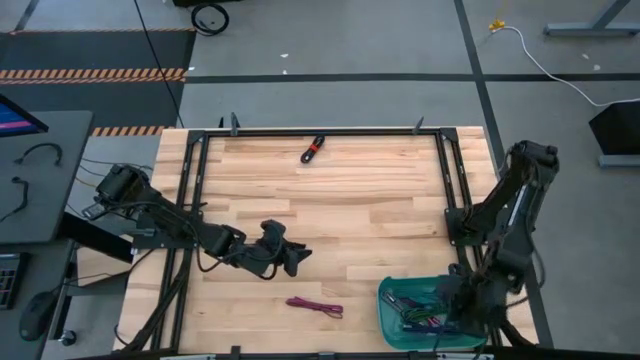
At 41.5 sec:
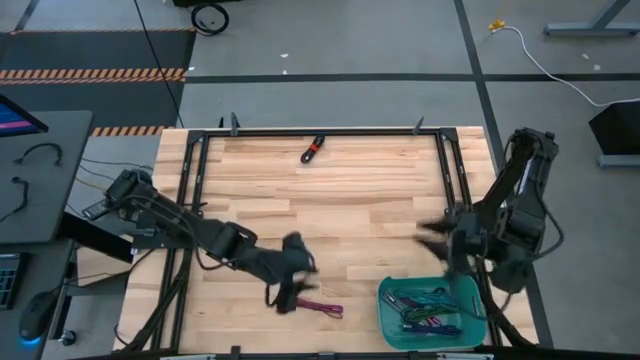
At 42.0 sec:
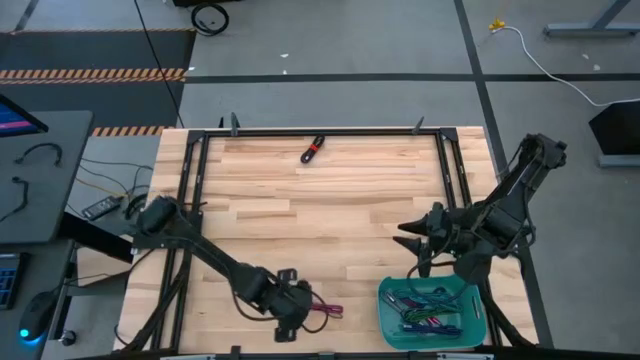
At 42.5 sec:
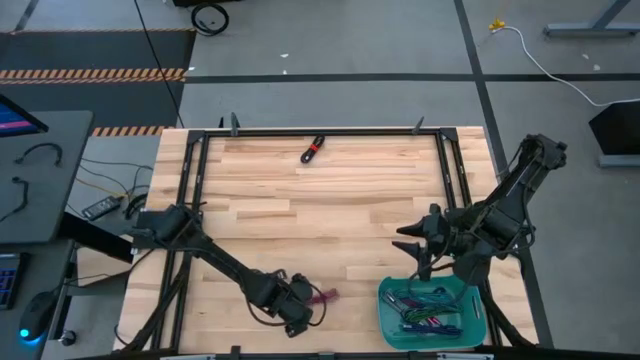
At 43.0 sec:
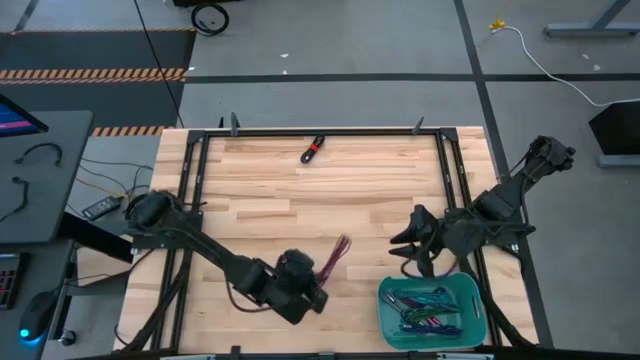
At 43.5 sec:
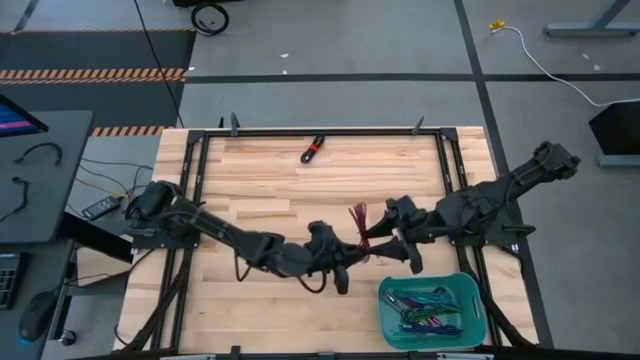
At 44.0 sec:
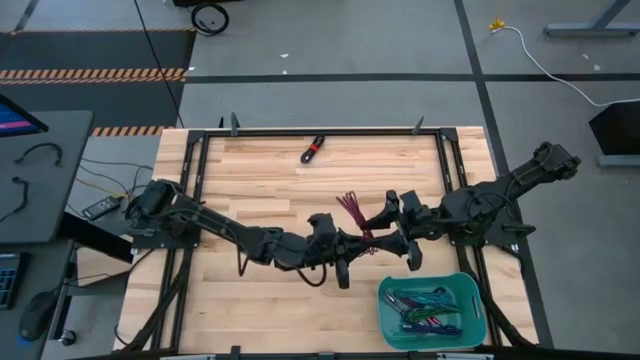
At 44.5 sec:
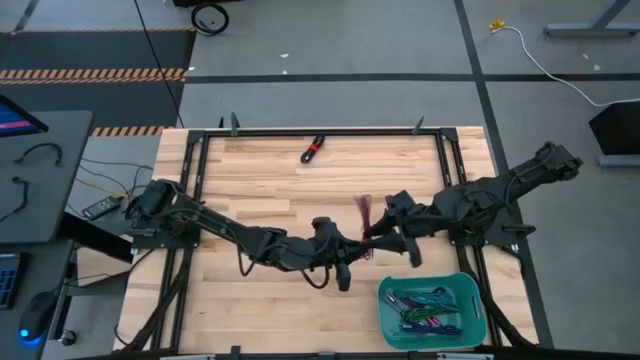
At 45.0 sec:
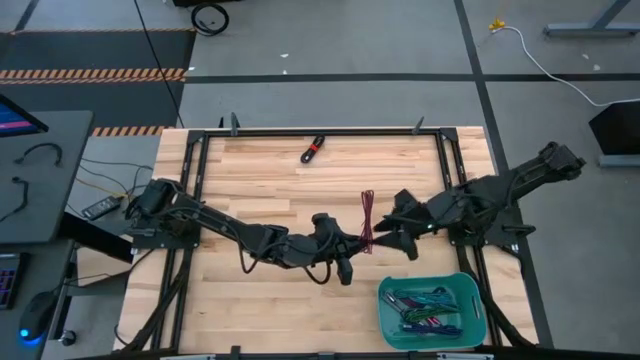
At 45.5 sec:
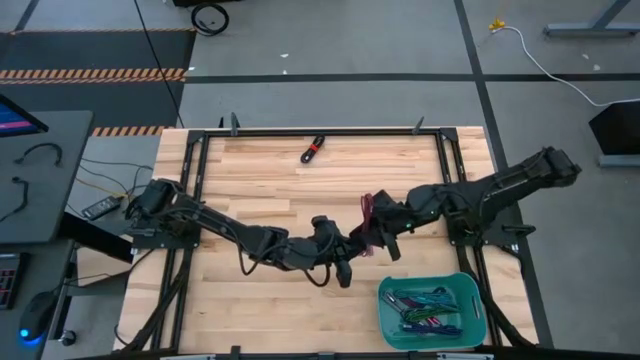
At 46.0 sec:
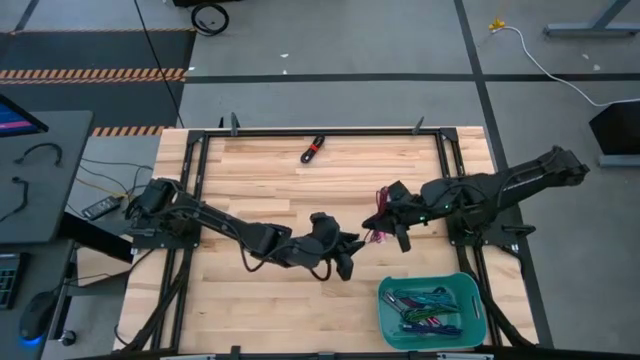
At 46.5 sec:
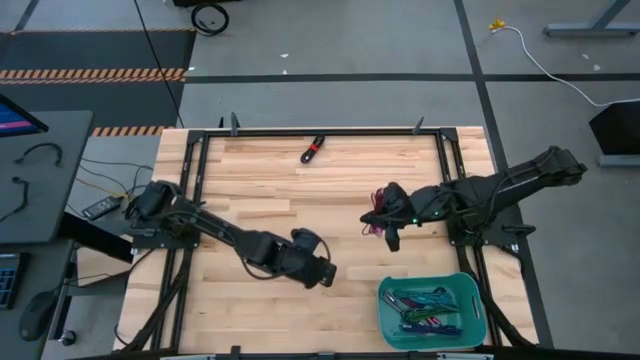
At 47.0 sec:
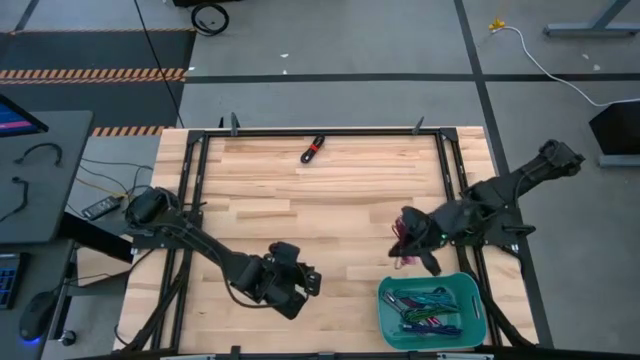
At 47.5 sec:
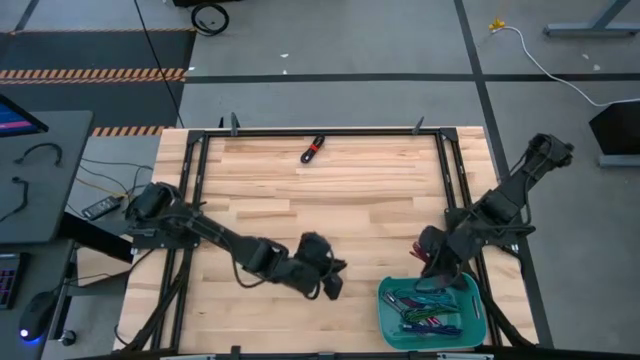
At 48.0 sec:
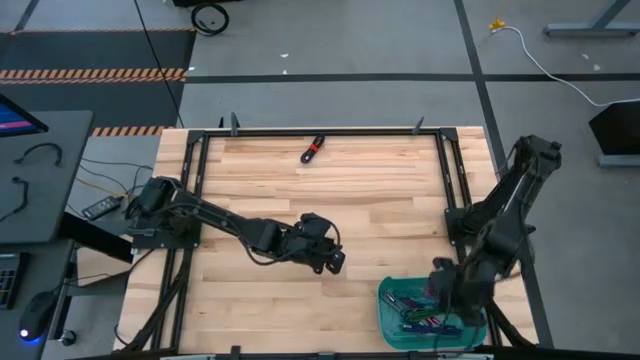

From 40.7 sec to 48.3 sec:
Task: Pick and place USB-C Cables
Put the pink charger cable into the green bin

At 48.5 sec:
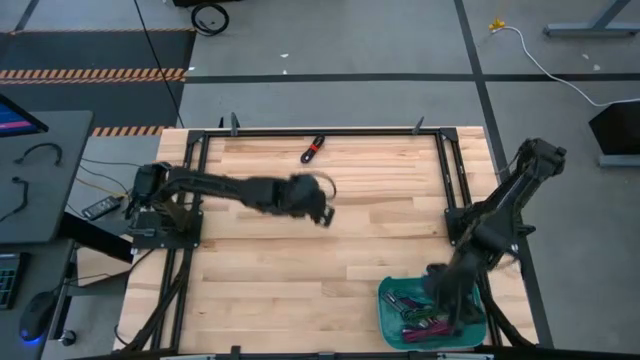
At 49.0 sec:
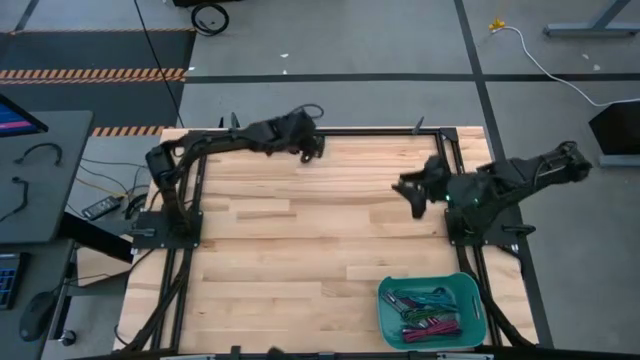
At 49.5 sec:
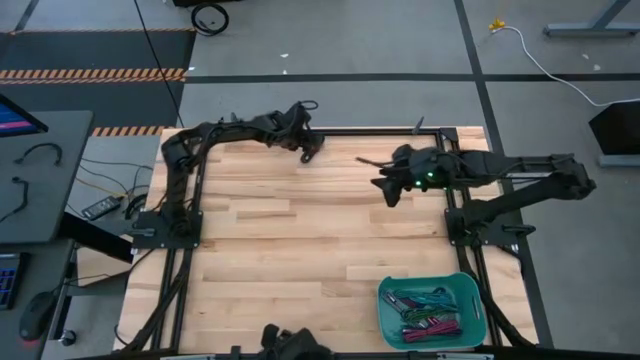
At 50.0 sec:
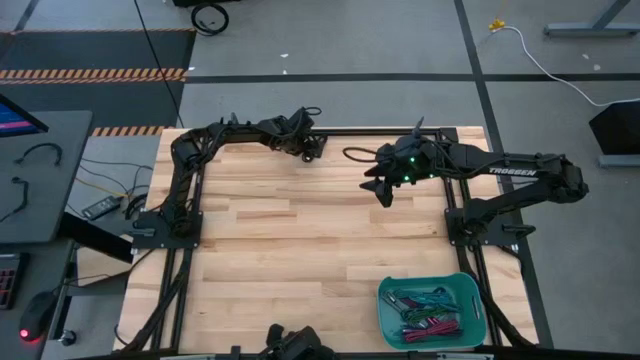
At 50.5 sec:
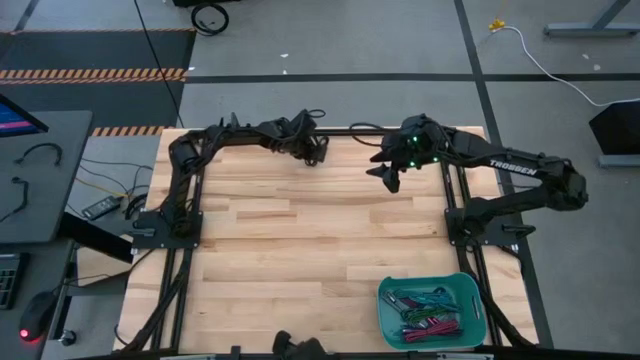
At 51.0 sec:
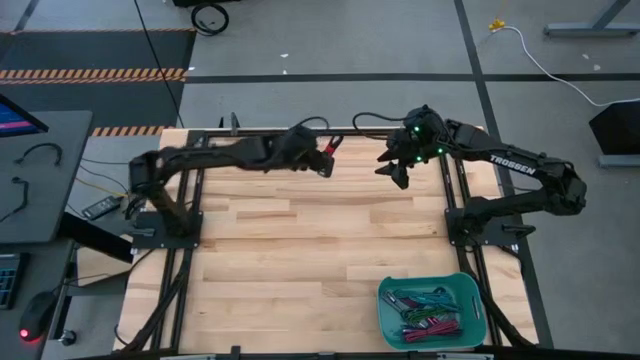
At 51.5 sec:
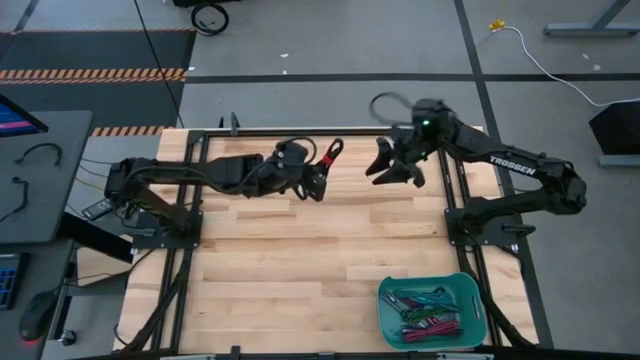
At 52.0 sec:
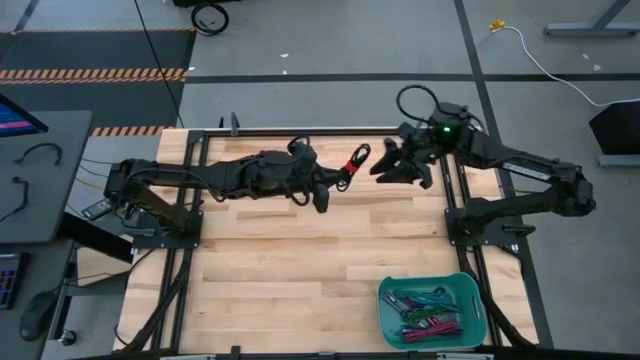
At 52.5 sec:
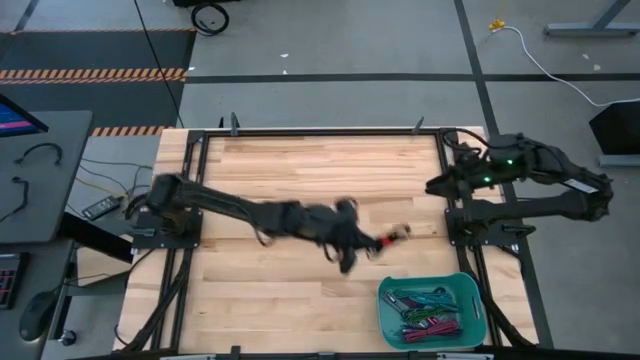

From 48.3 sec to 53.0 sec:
Put the black charger cable into the green bin

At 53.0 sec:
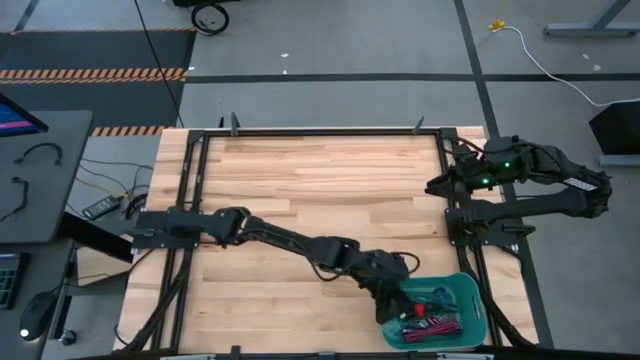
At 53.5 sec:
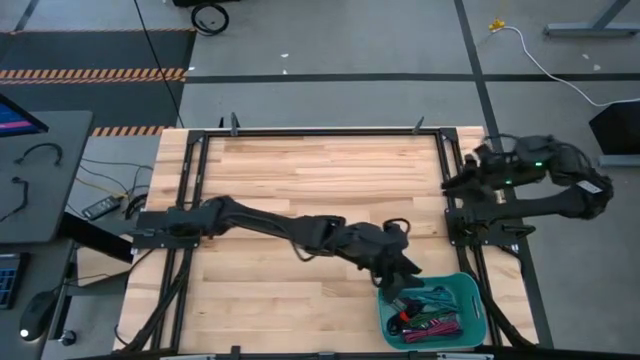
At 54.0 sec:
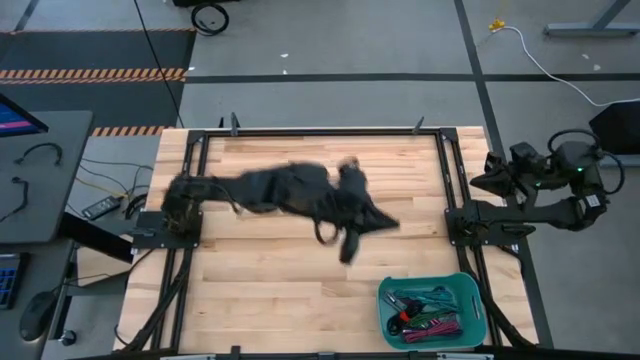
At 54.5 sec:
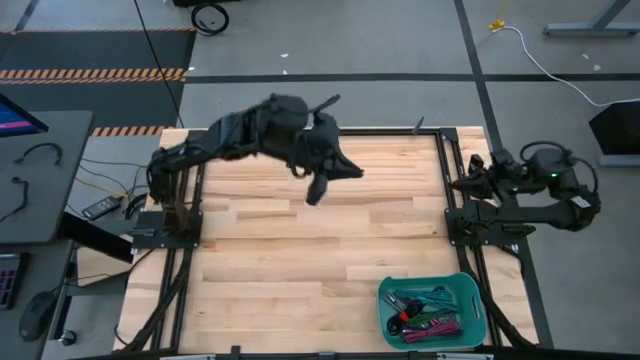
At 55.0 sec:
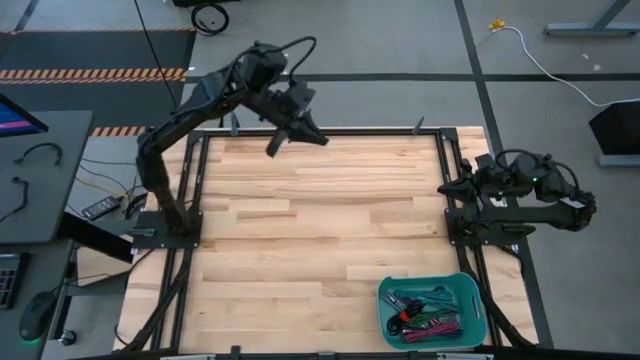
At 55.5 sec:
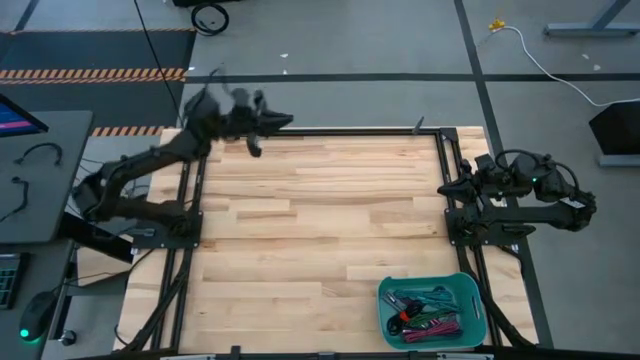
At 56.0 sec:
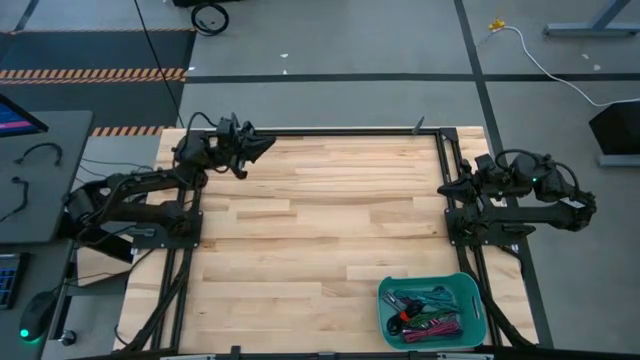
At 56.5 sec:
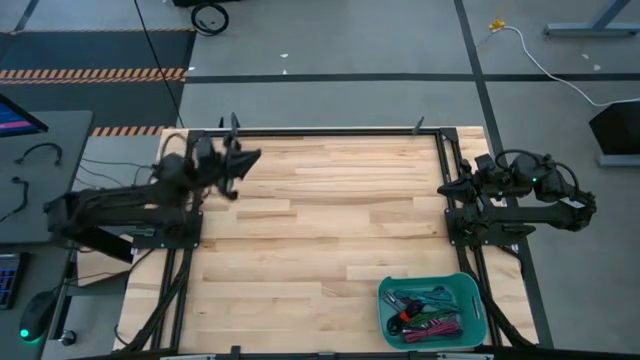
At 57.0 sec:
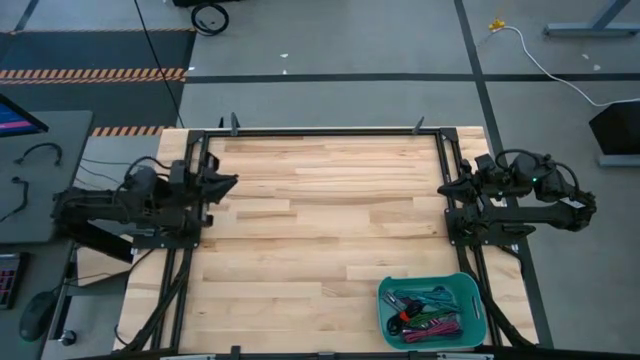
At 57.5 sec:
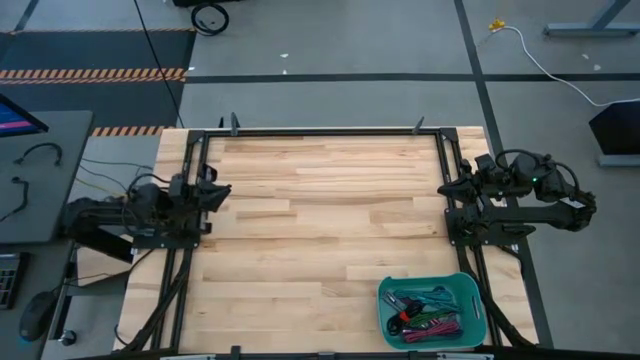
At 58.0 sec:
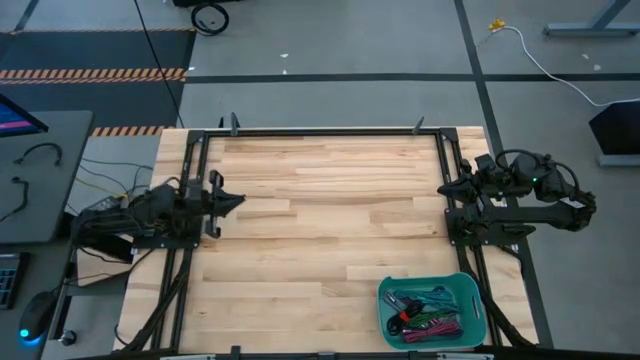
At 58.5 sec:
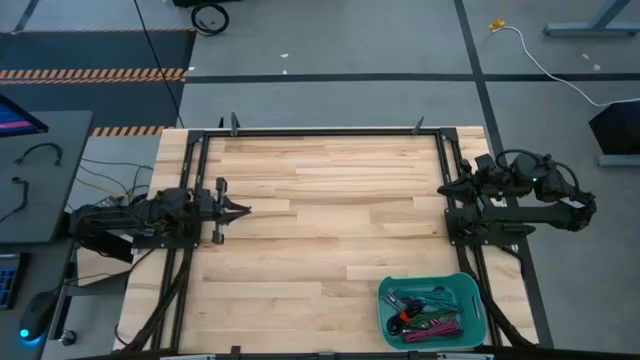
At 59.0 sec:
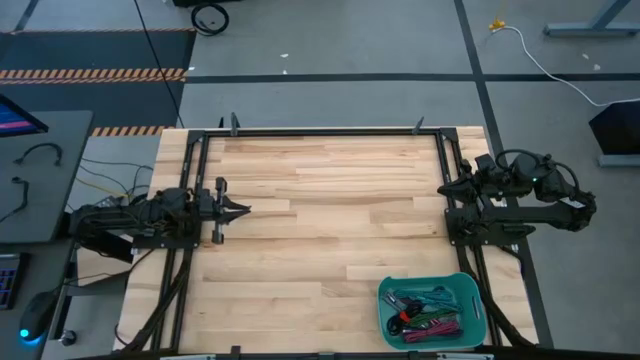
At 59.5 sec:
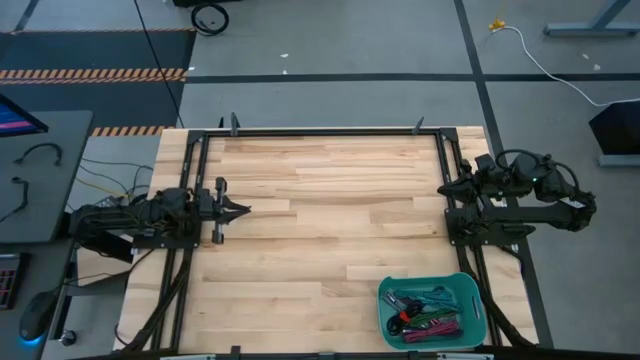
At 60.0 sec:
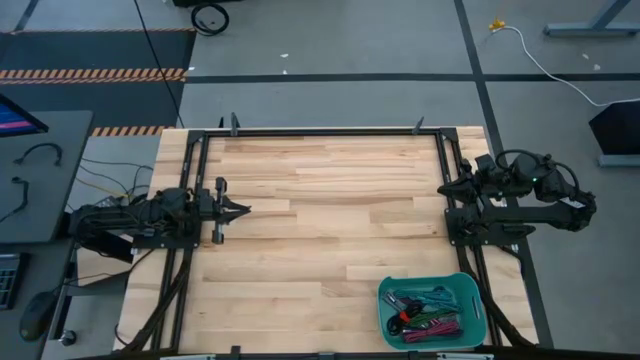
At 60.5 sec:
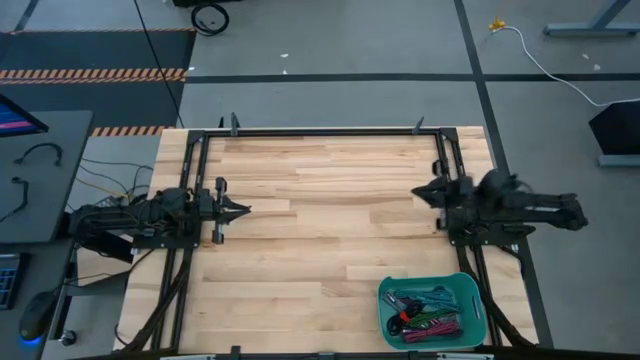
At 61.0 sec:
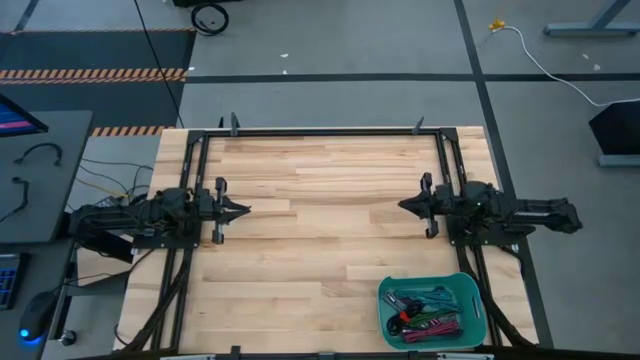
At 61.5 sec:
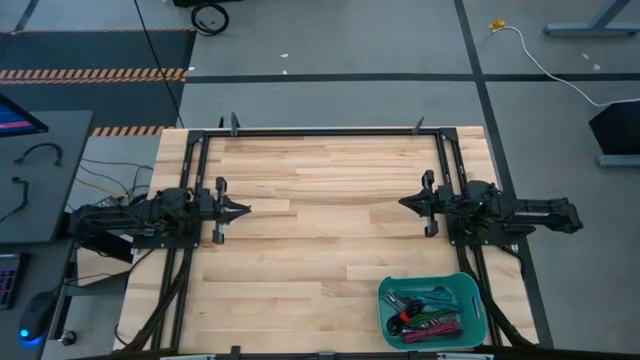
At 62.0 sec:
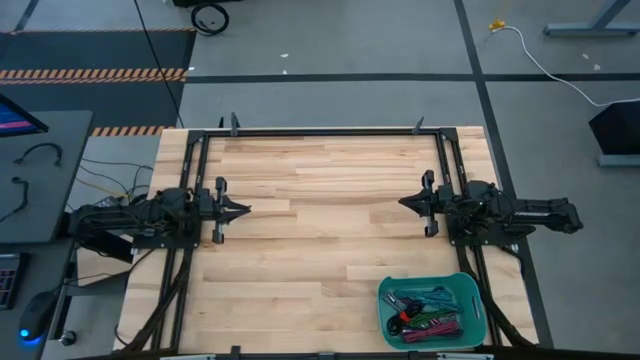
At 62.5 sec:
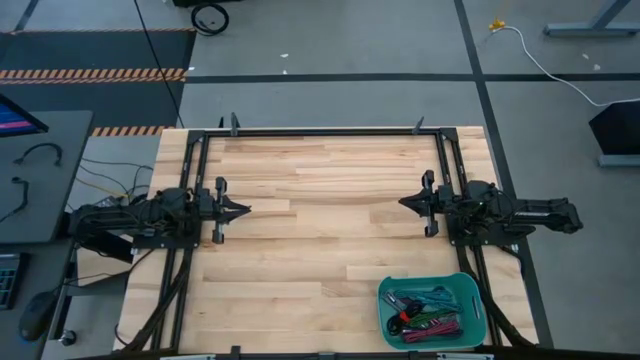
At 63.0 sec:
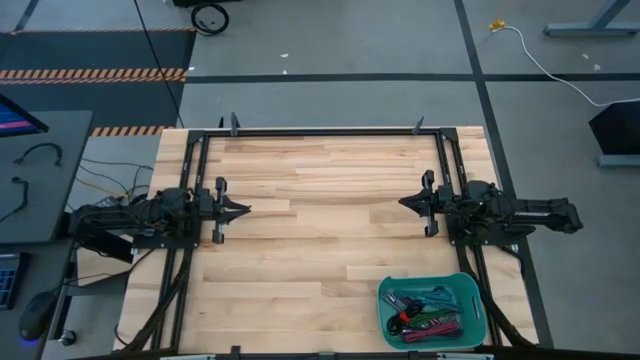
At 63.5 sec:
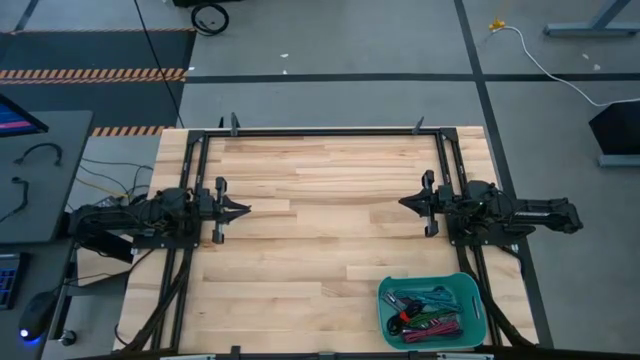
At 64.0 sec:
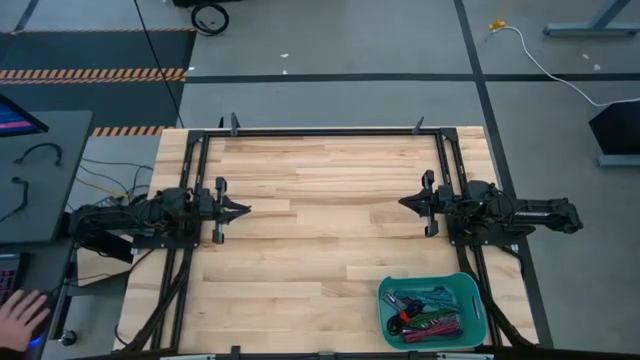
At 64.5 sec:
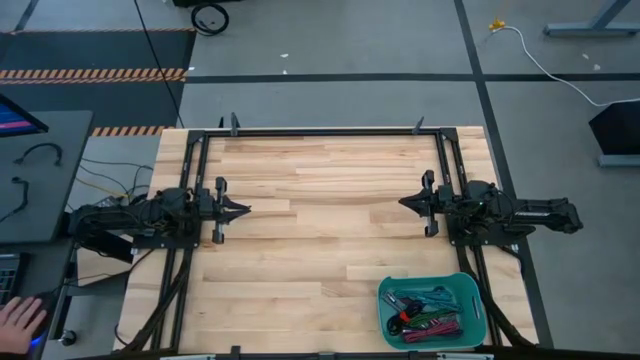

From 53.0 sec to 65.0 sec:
Return to Home Position
